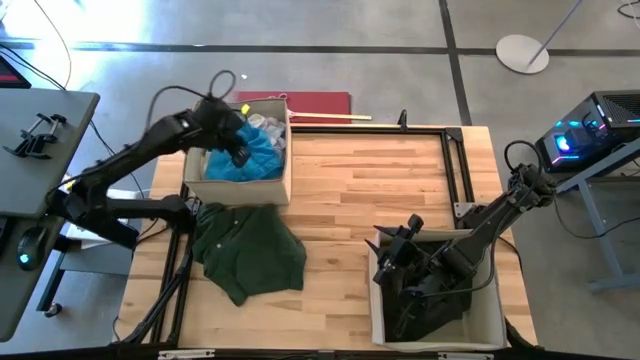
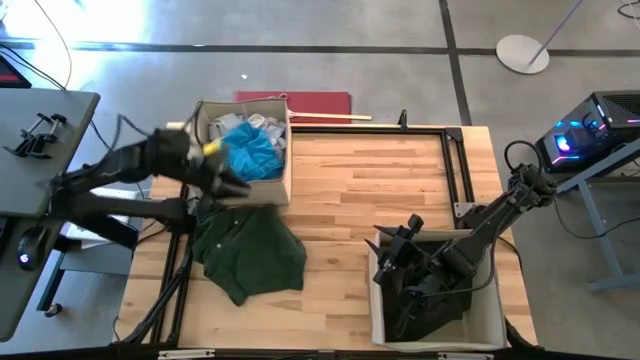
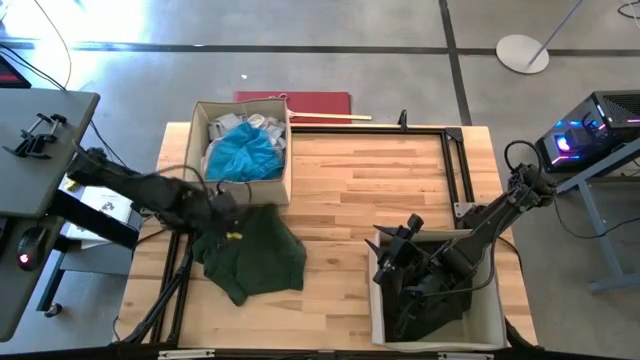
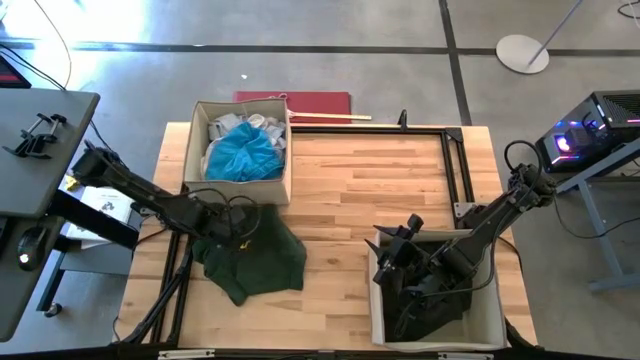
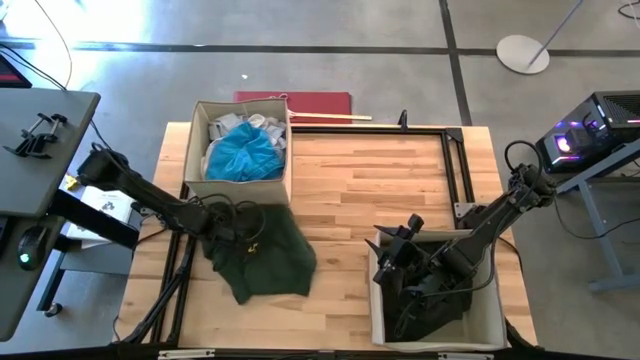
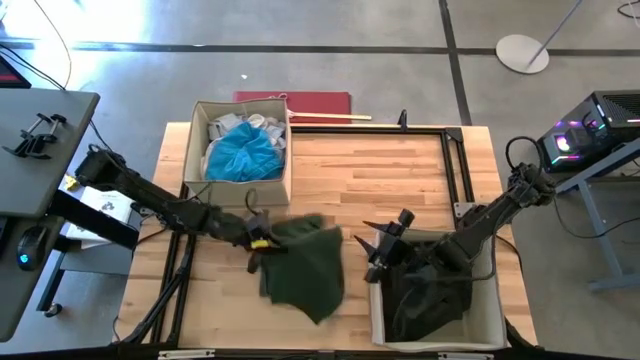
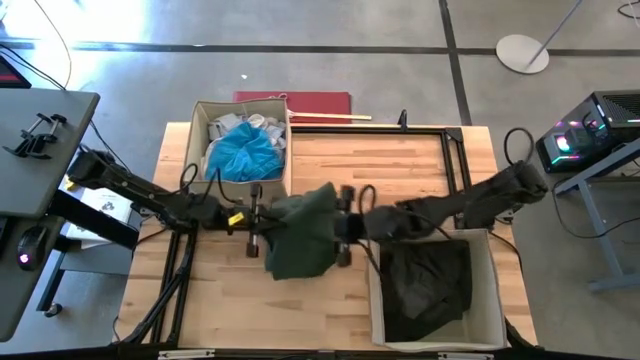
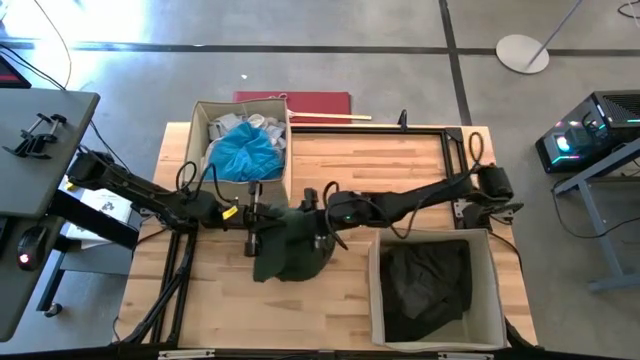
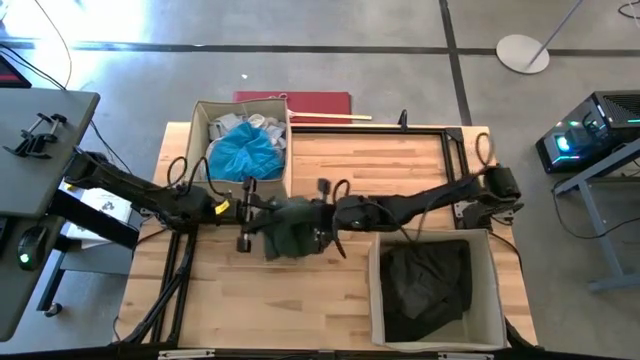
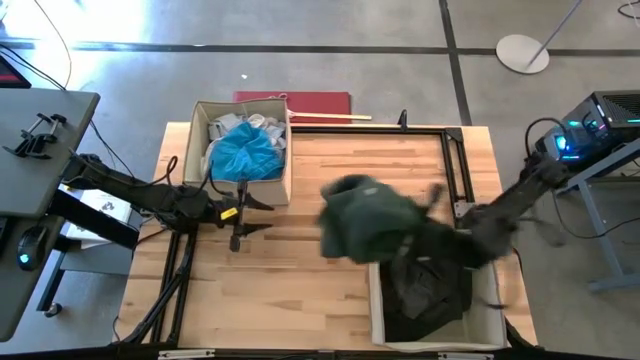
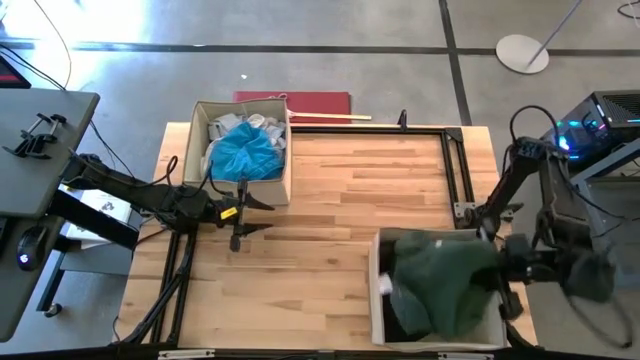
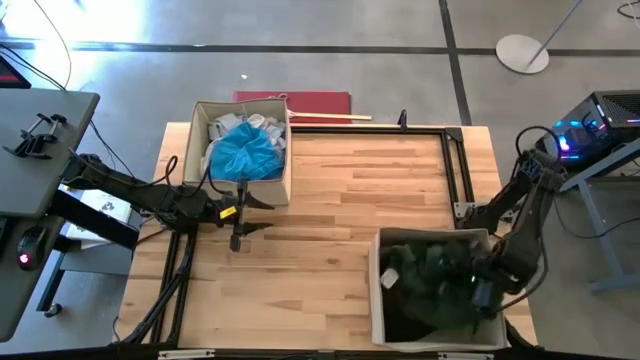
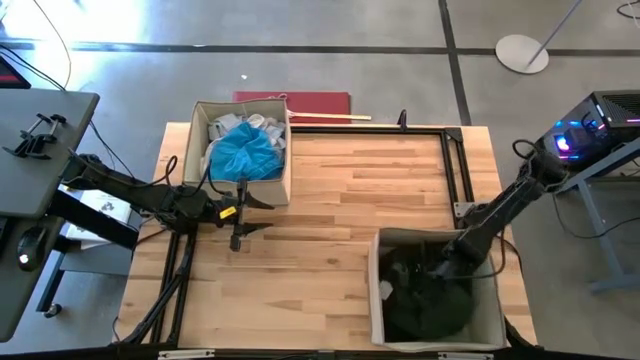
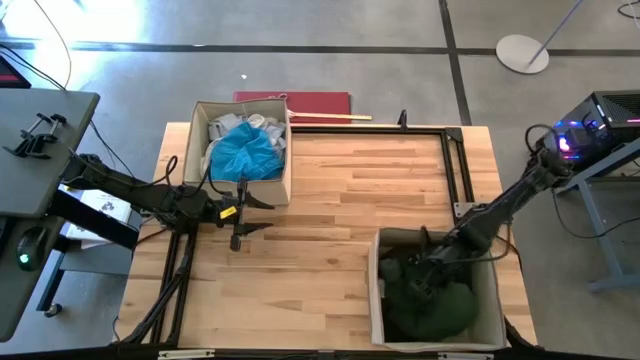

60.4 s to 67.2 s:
Task: Sort clothes
Put the green polo shirt into the bottom laundry organizer

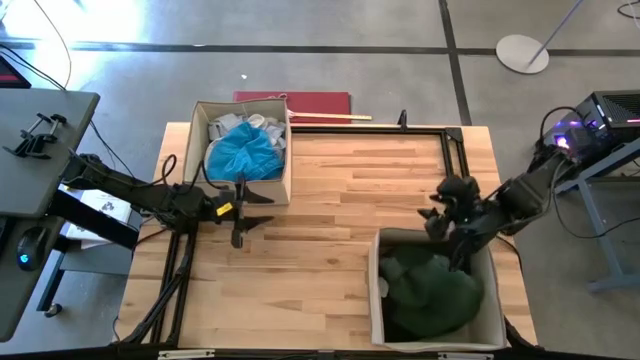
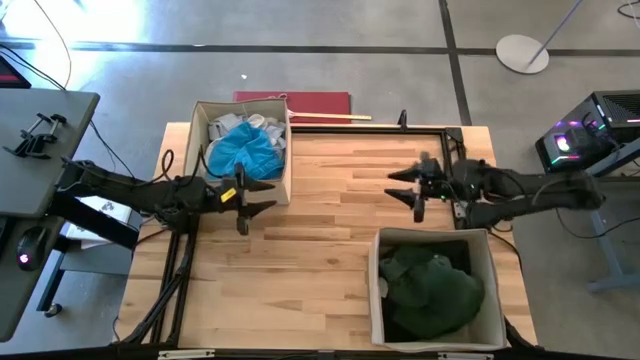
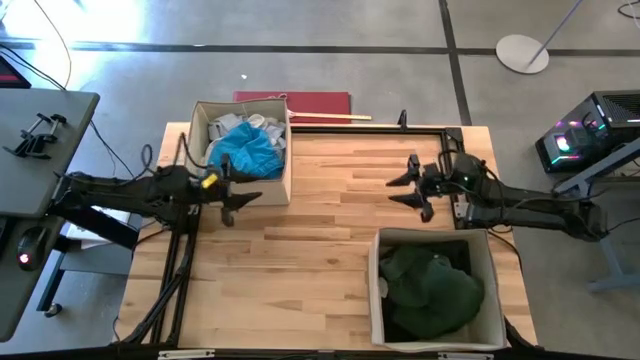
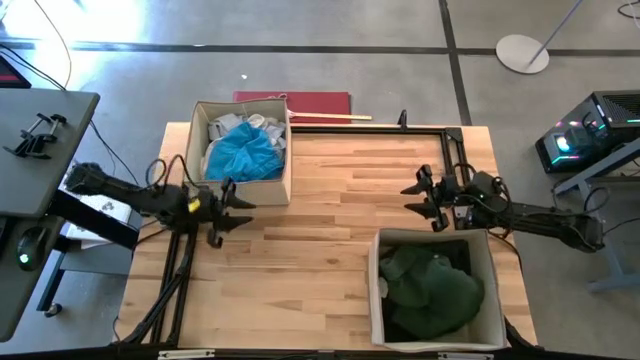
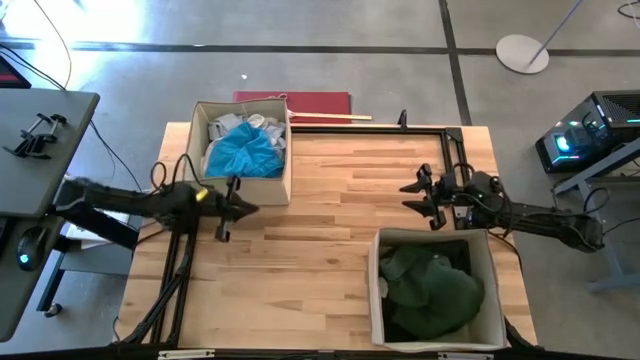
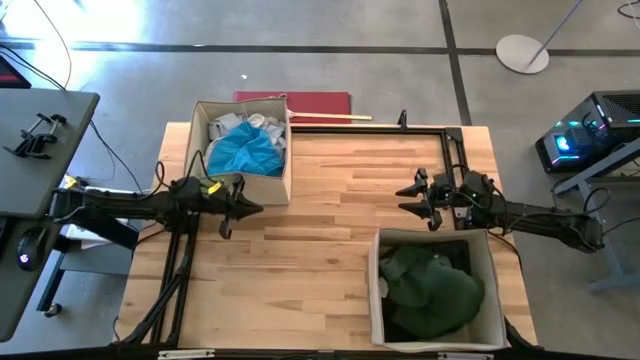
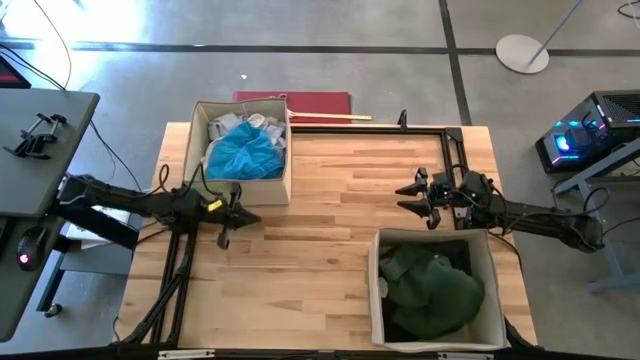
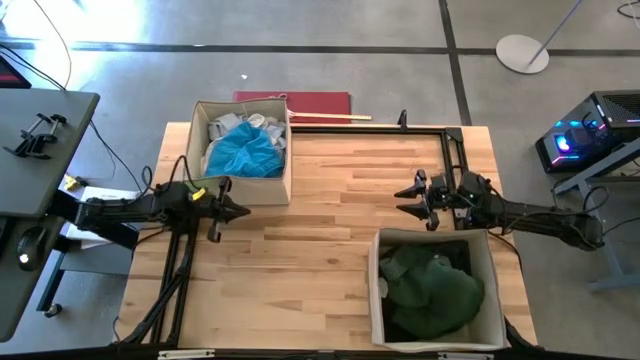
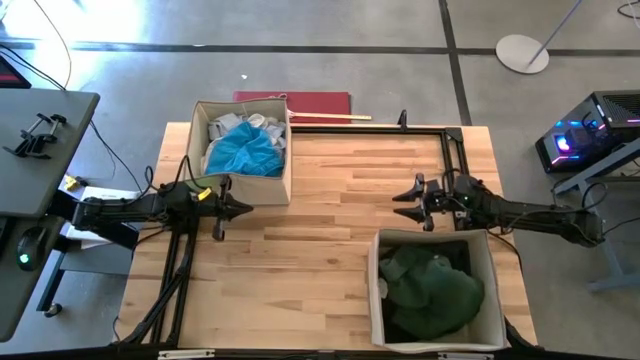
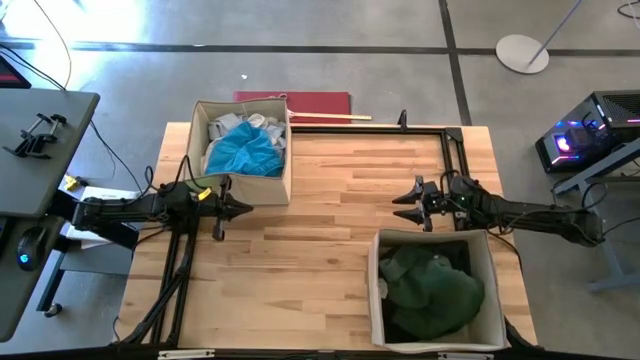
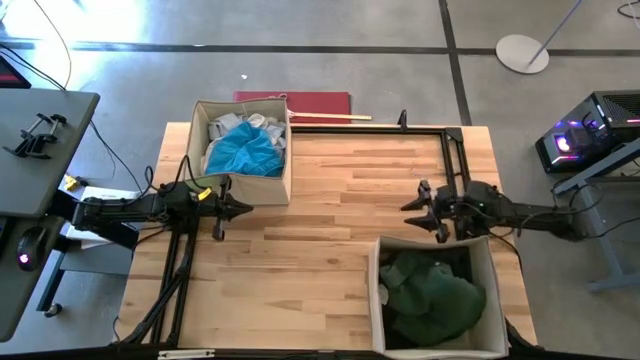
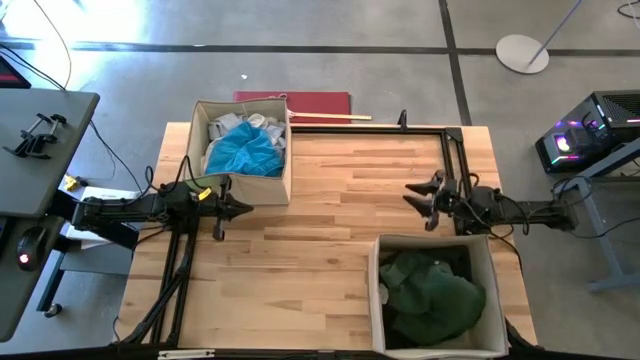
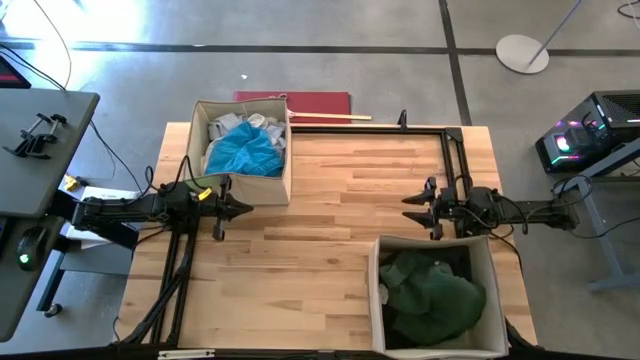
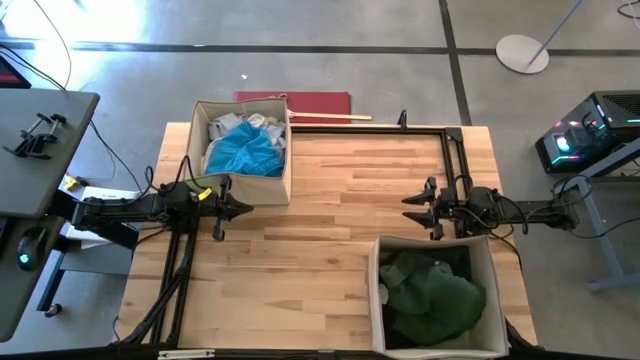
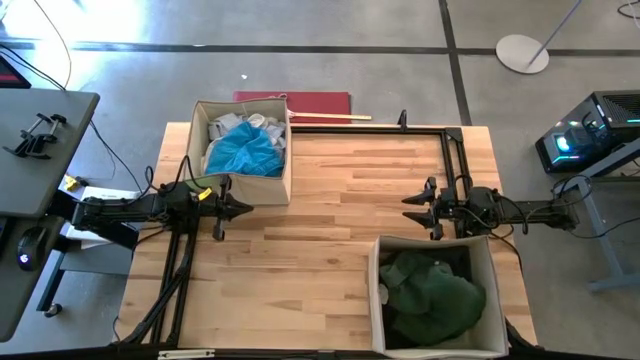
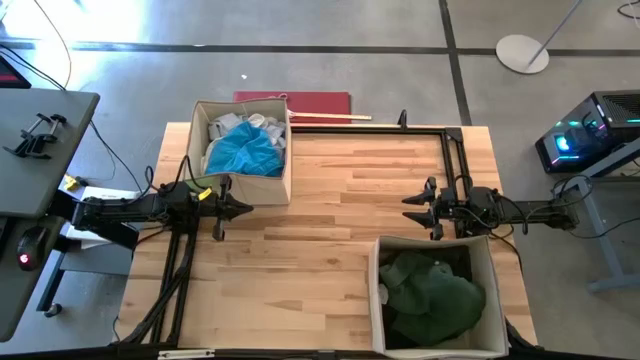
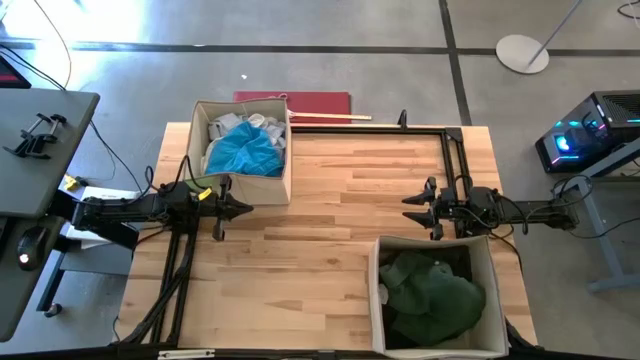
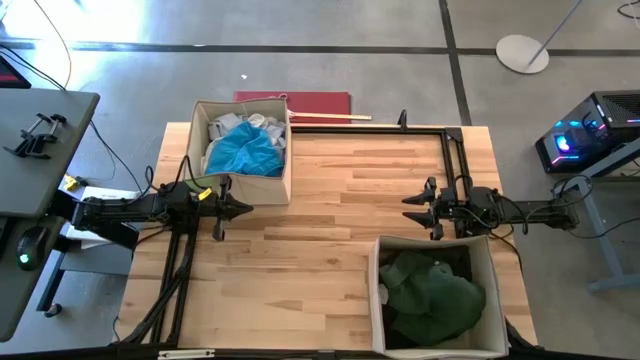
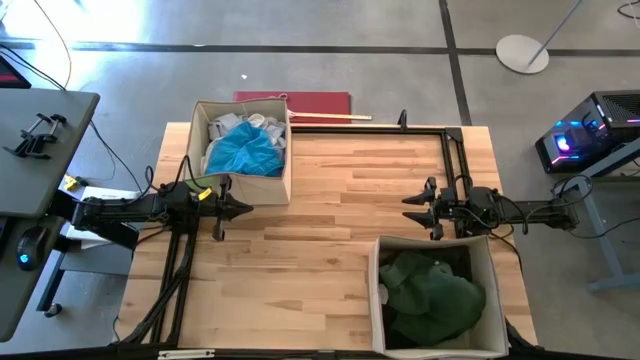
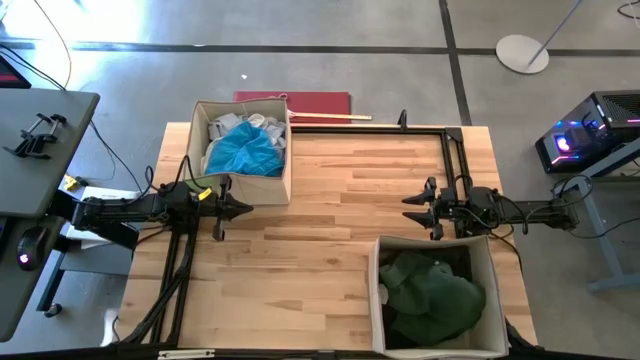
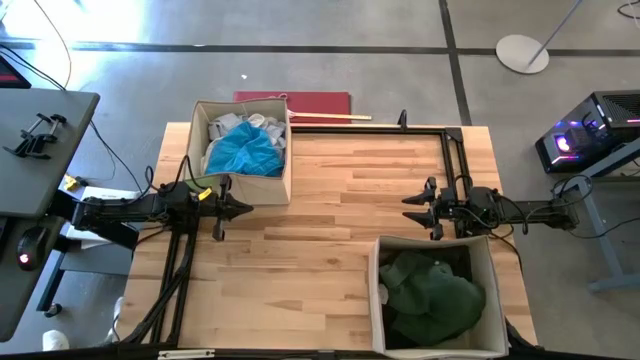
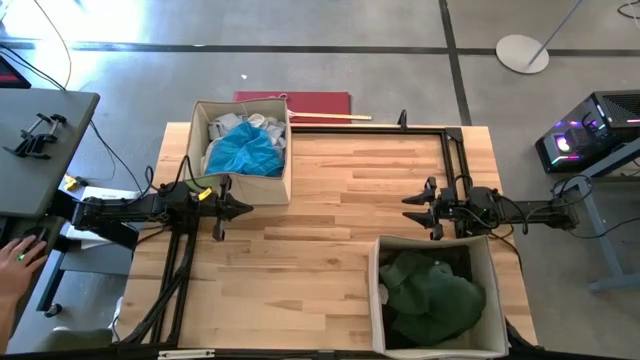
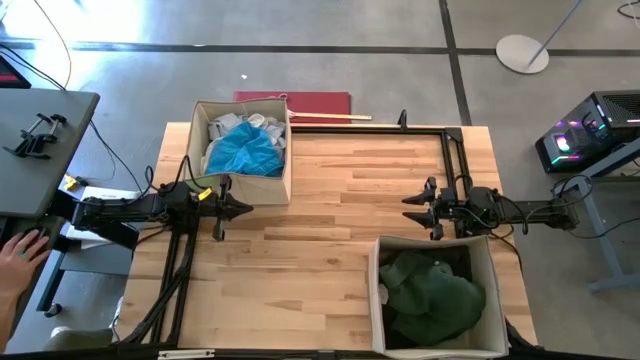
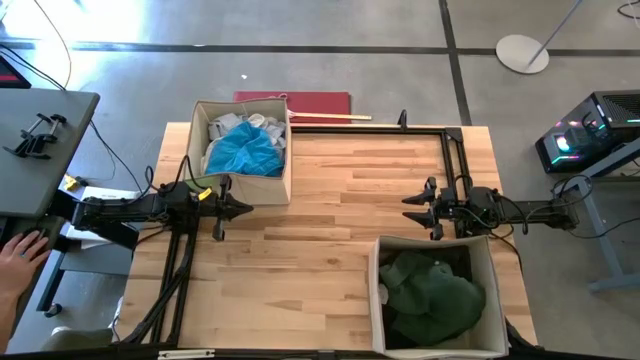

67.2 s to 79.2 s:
Return to Home Position

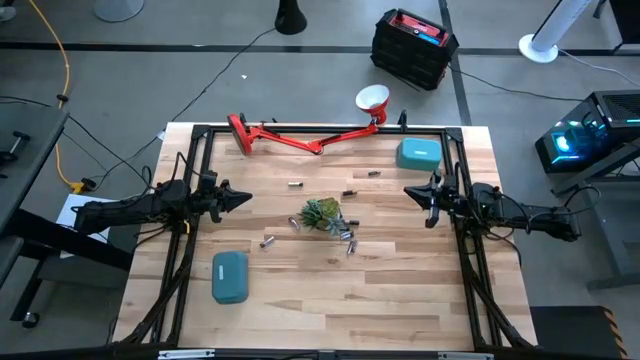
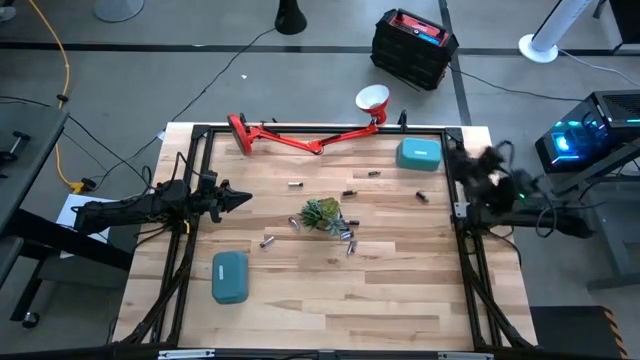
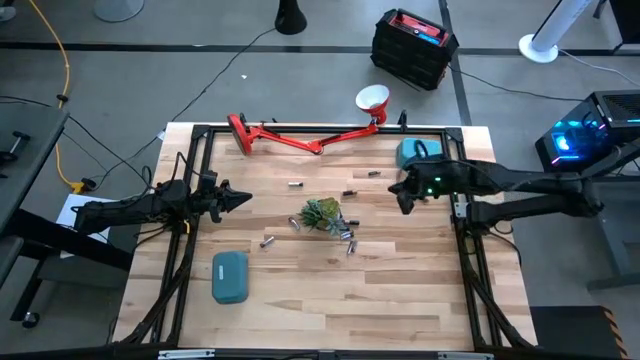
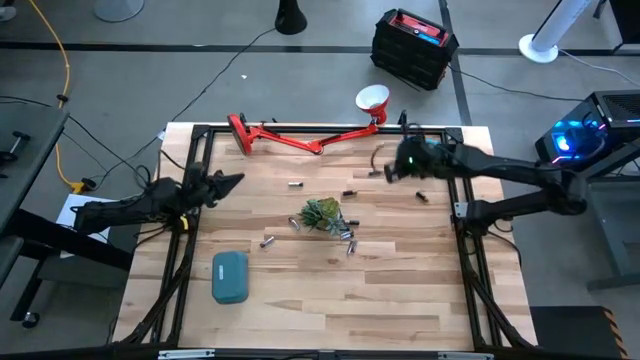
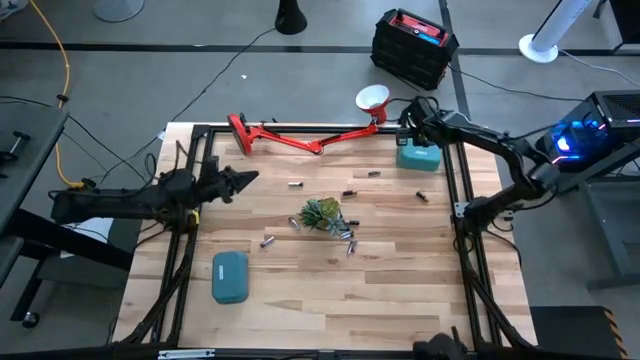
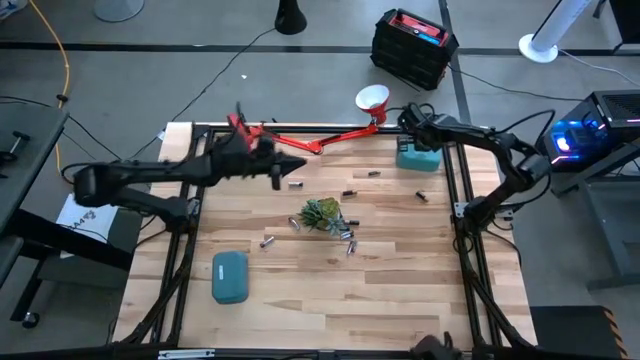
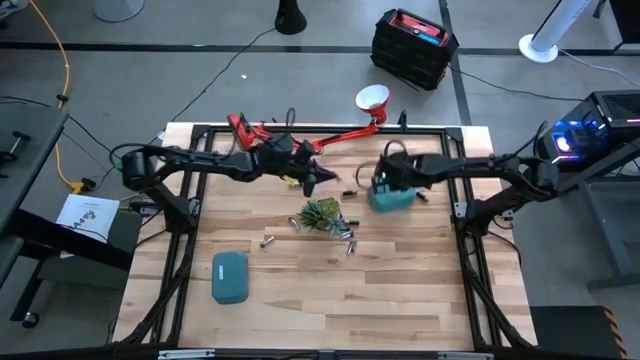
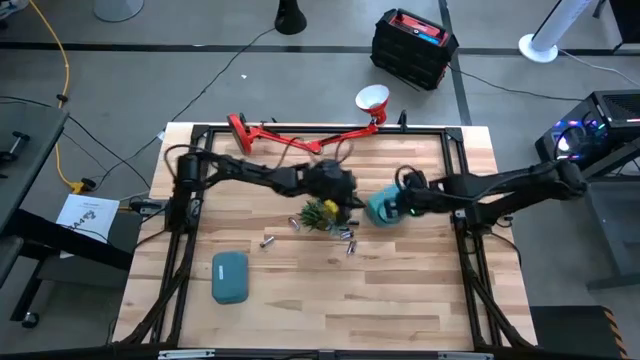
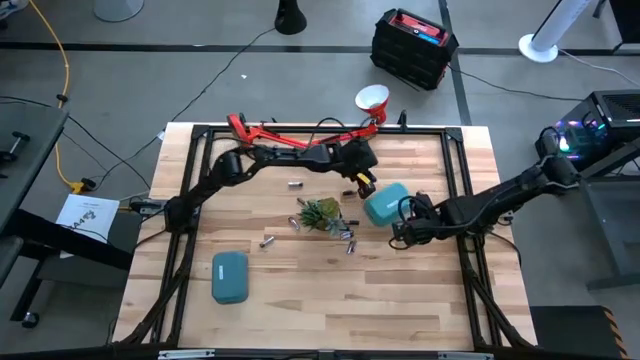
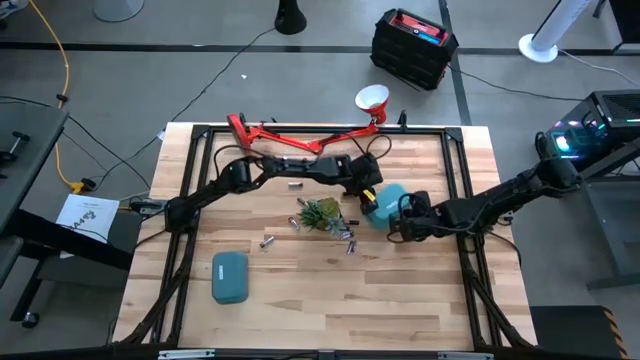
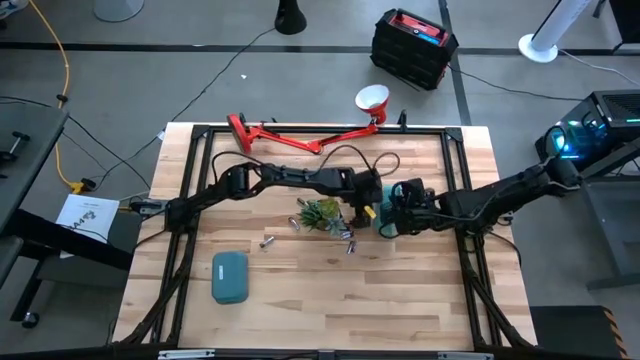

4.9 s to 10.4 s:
Task: Sort batteries
Prepare the green bin
